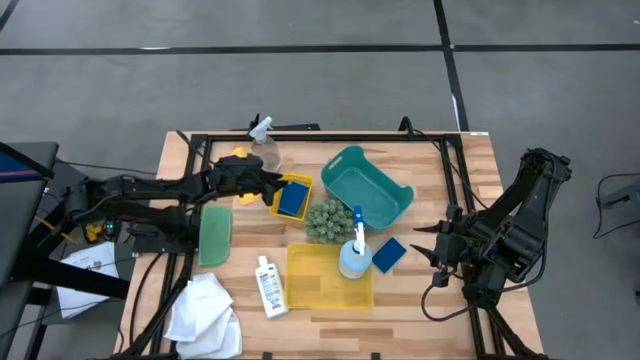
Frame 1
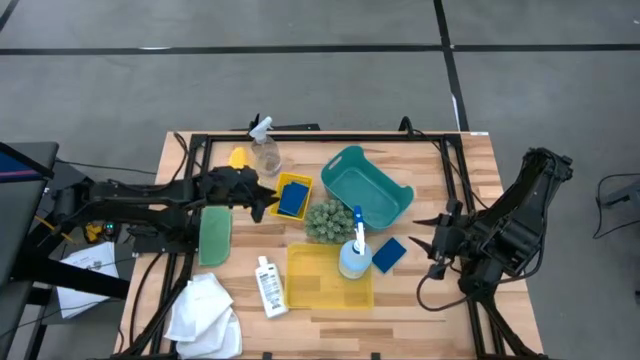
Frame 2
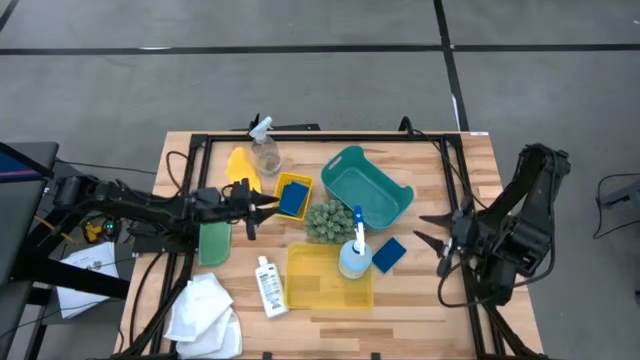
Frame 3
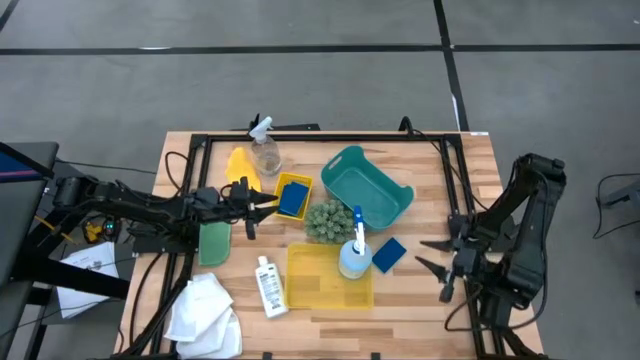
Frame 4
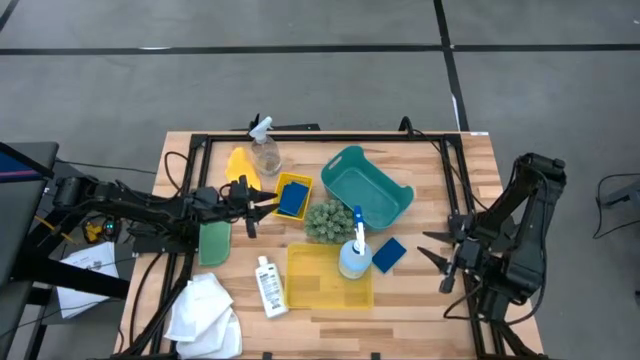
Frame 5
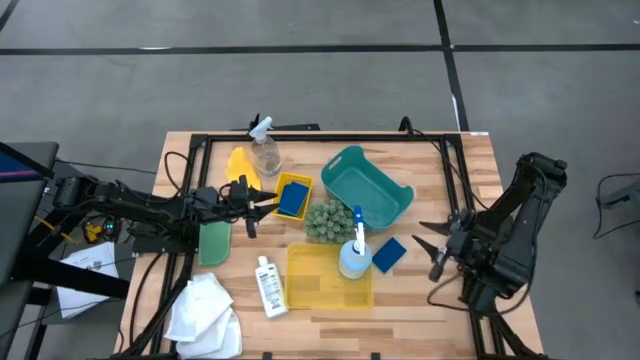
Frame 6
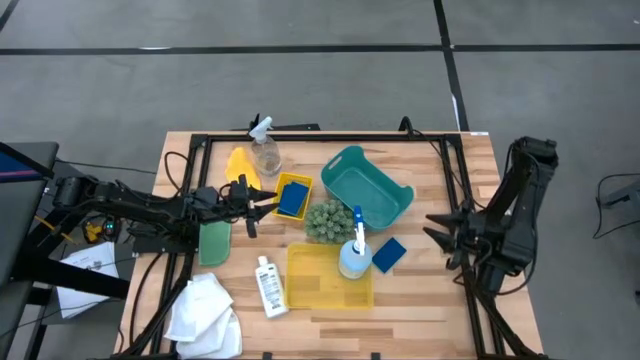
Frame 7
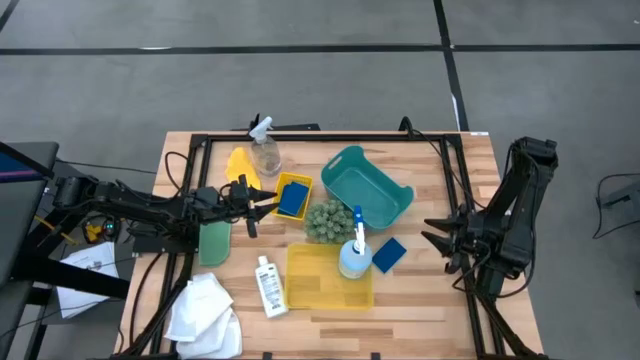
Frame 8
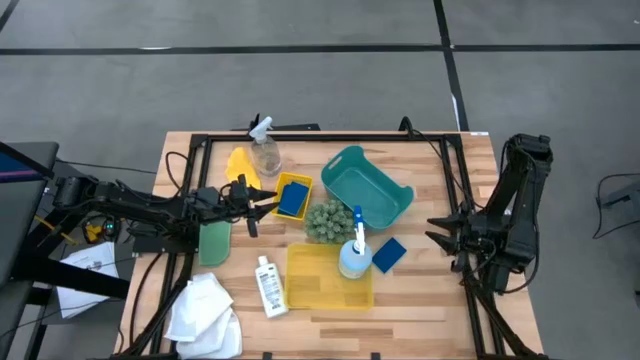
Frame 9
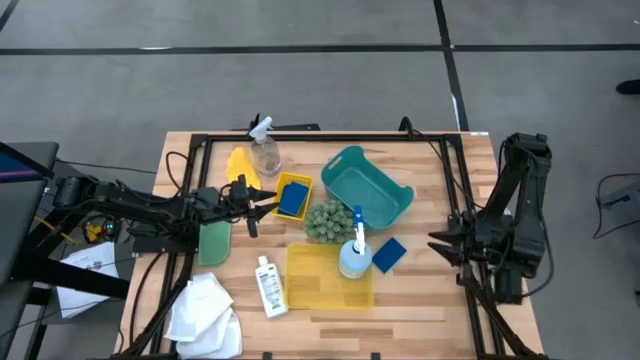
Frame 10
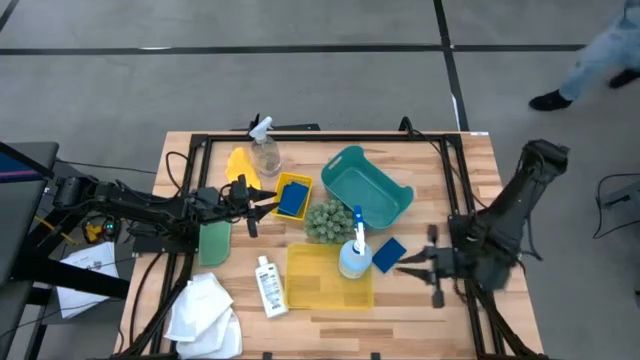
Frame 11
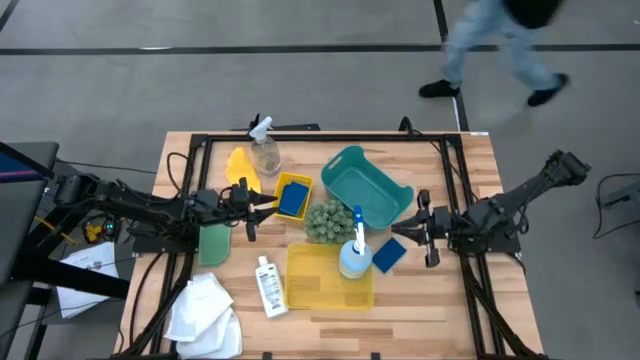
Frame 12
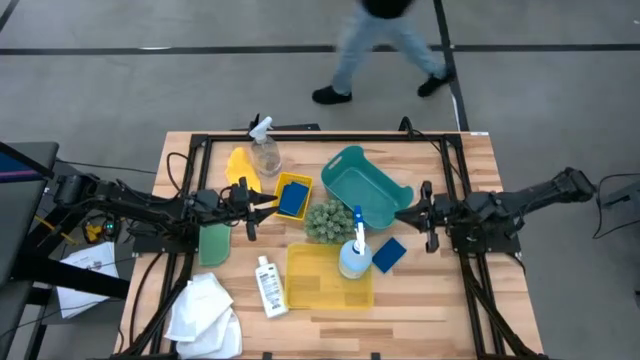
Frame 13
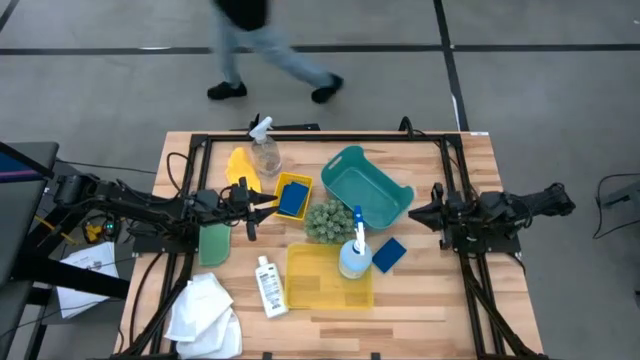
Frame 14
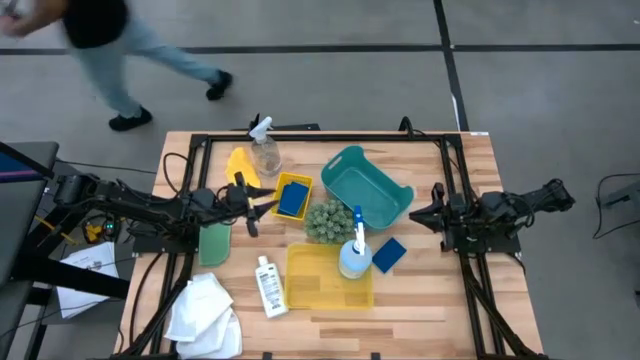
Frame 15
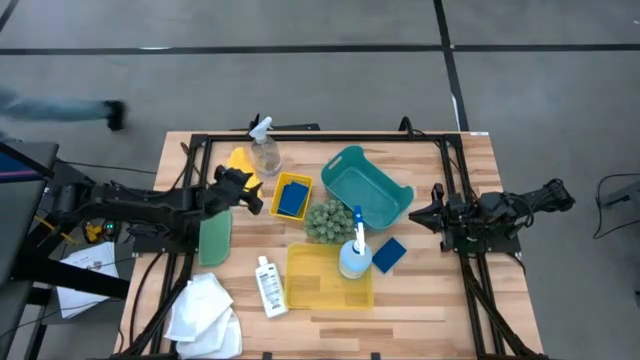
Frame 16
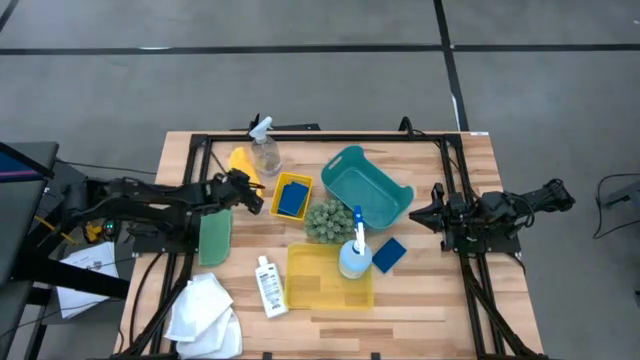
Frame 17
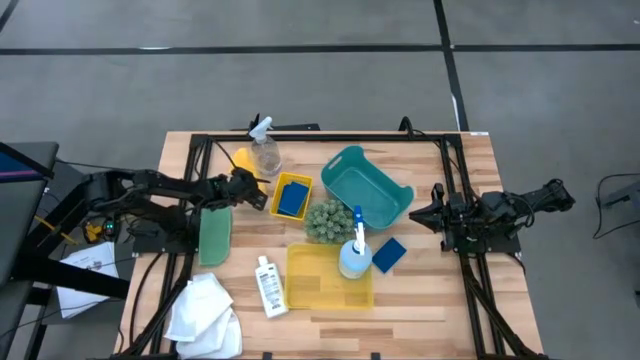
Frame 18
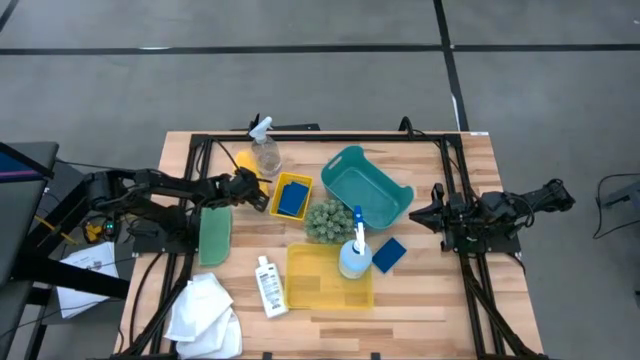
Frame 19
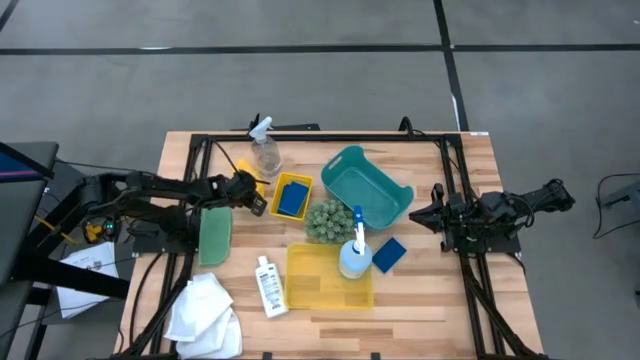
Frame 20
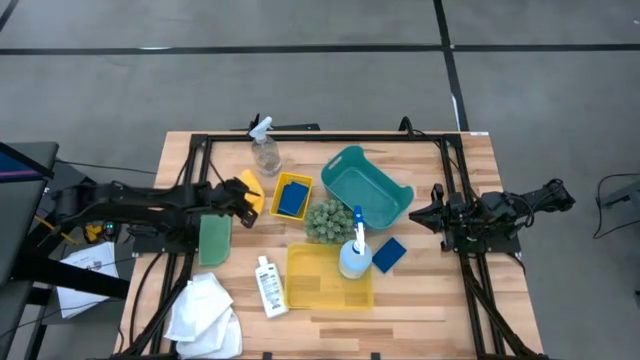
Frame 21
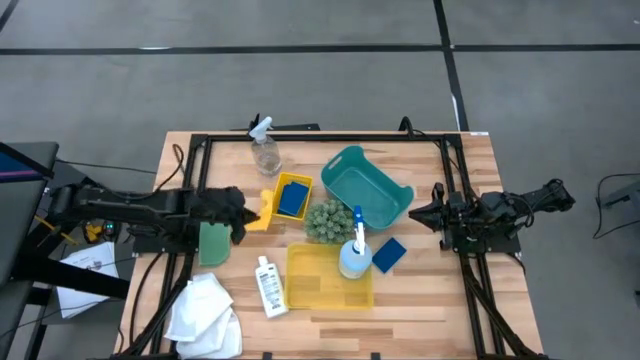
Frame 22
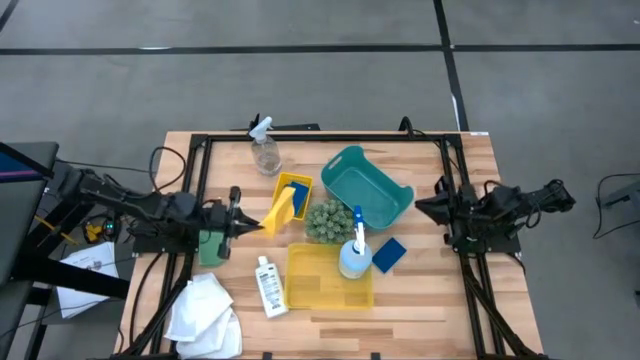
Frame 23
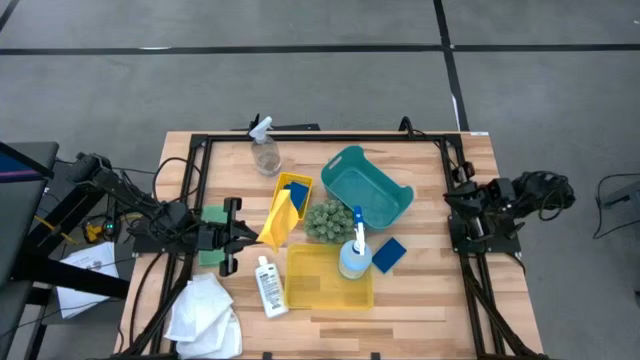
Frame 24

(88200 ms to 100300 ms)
Task: Pick & Place Kitchen Items
Put the yellow microfiber cloth into the green bin

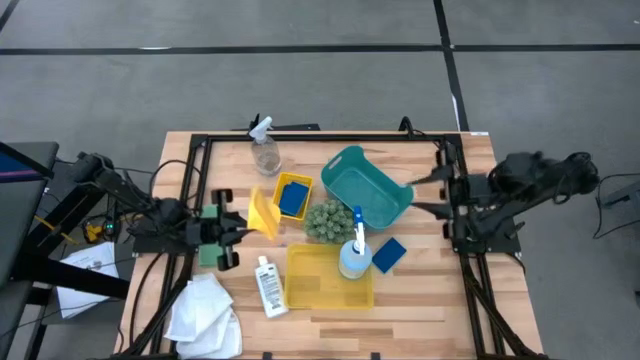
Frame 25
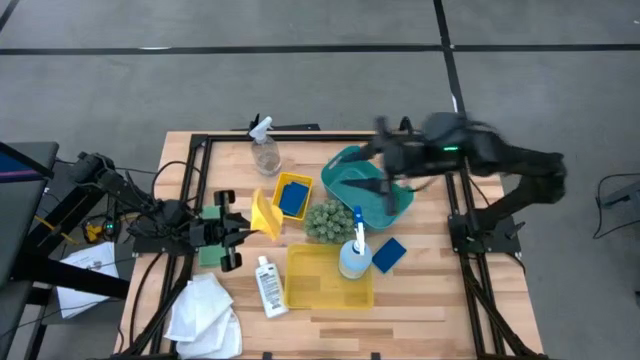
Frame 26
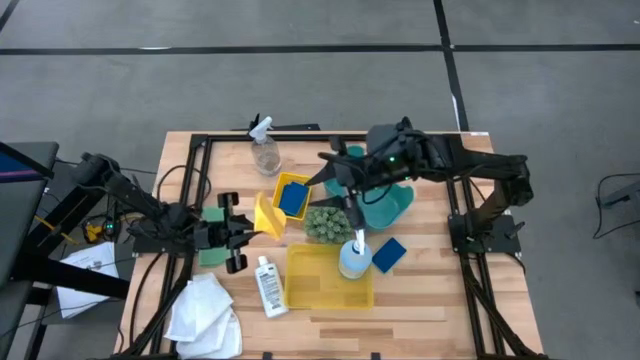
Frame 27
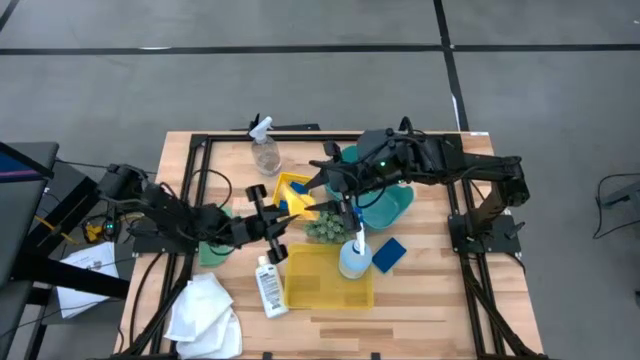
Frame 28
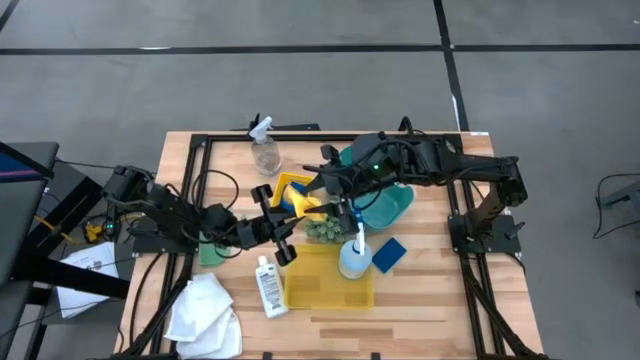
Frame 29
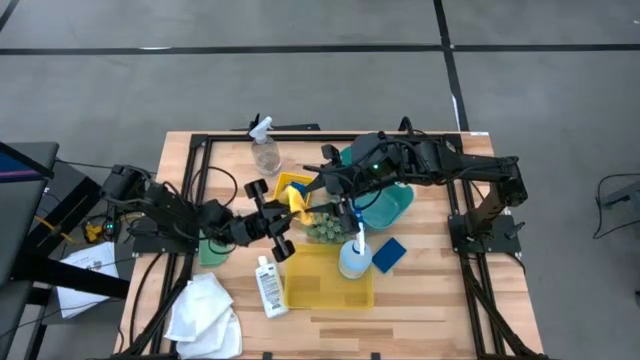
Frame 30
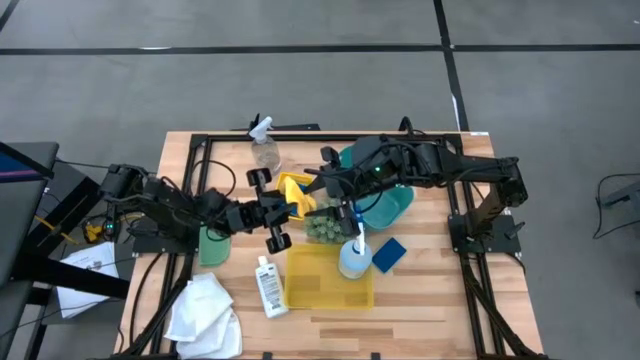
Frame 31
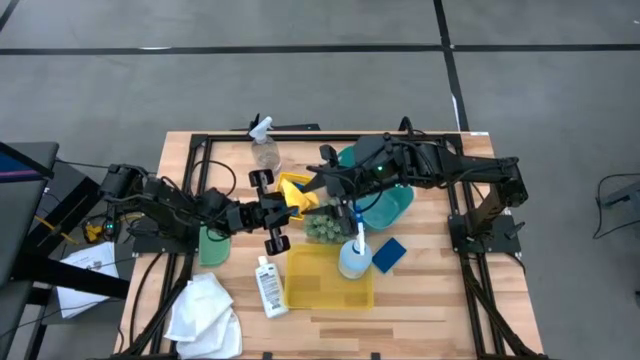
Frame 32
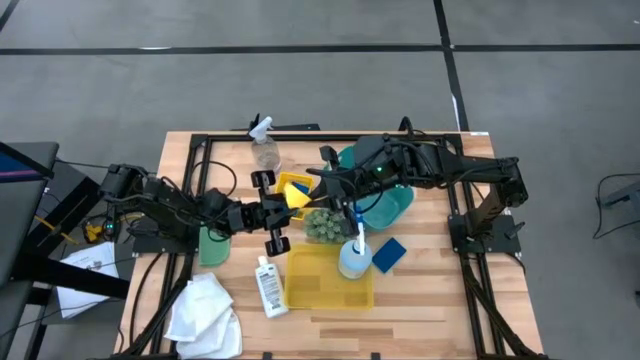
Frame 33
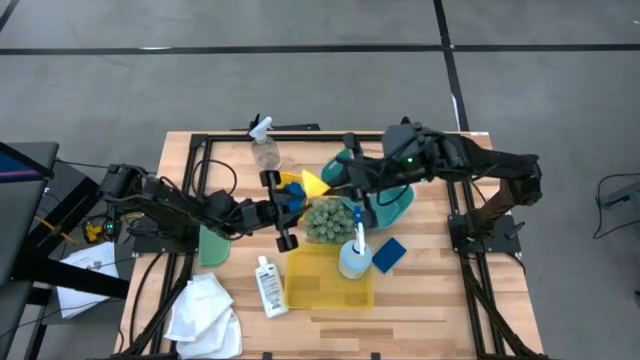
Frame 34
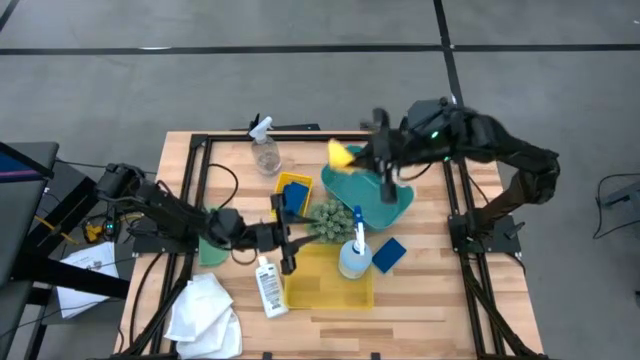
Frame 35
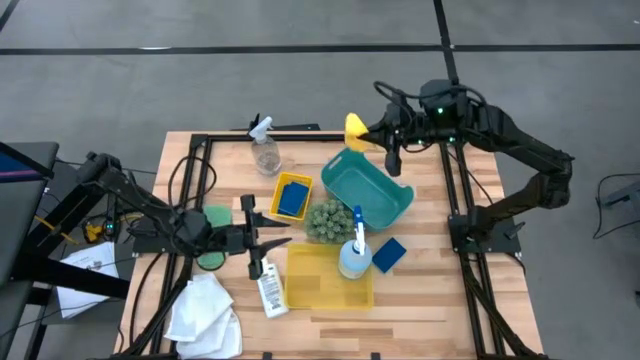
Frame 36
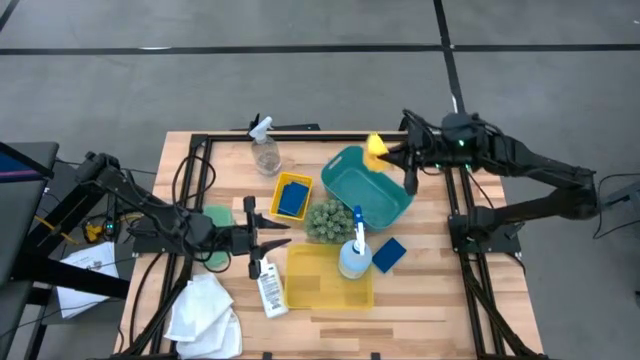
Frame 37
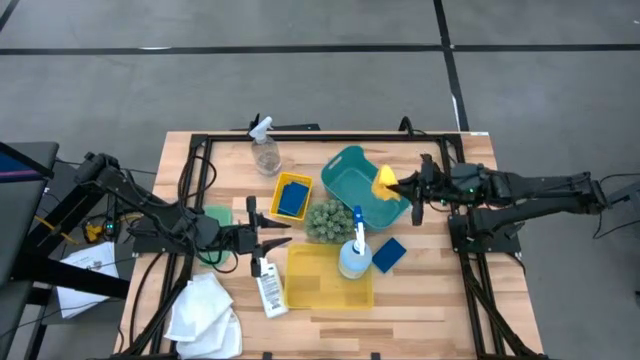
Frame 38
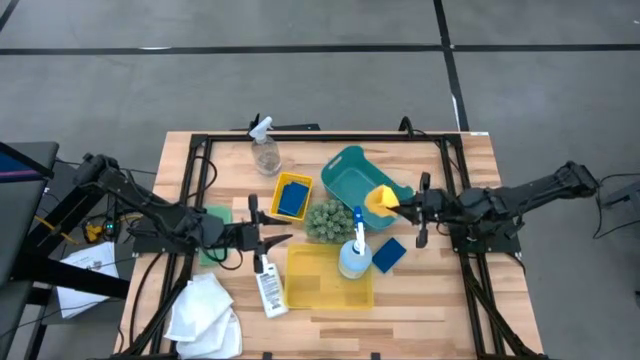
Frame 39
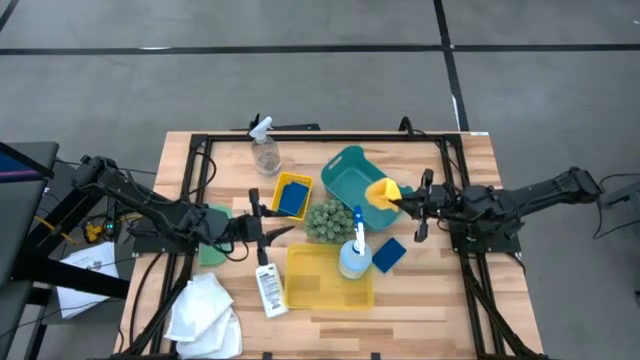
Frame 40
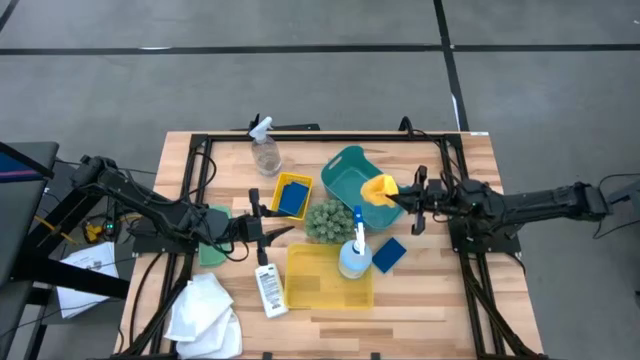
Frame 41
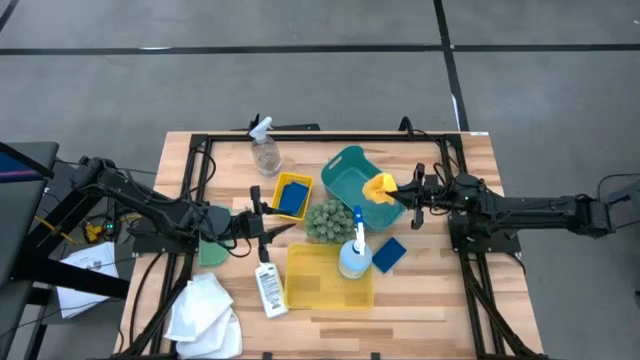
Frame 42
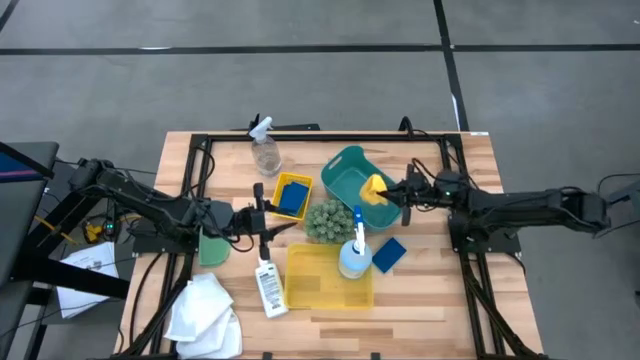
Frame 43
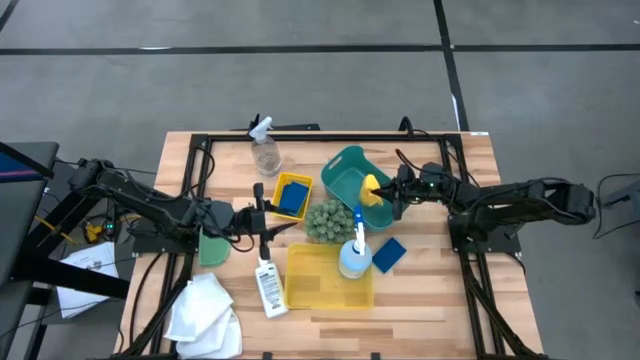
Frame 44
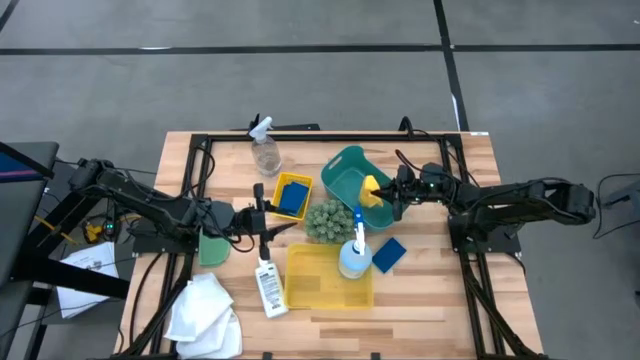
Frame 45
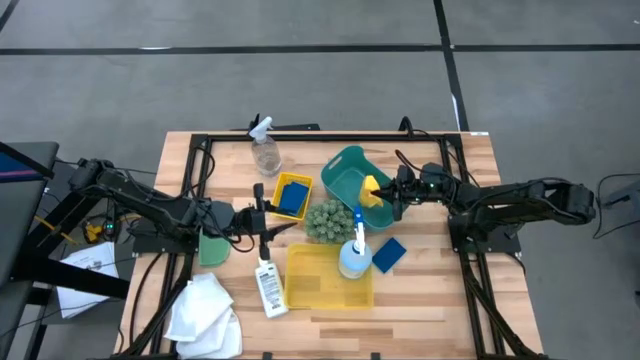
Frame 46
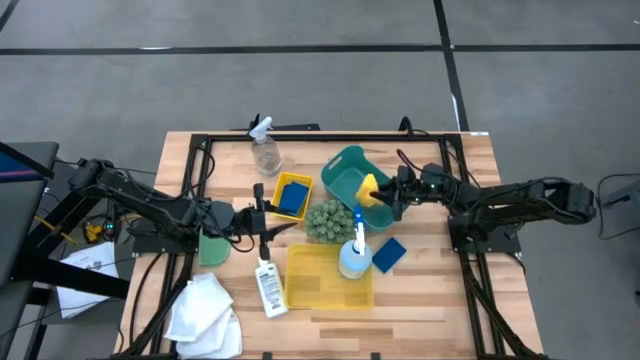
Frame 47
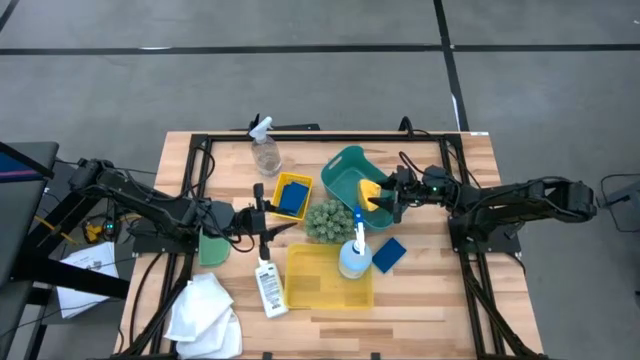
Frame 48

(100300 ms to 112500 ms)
Put the yellow microfiber cloth into the green bin
